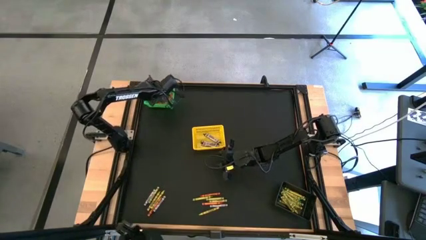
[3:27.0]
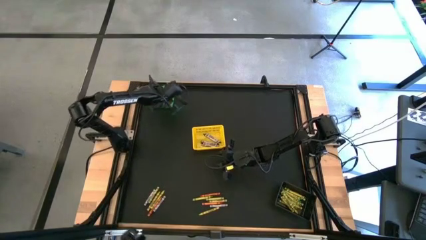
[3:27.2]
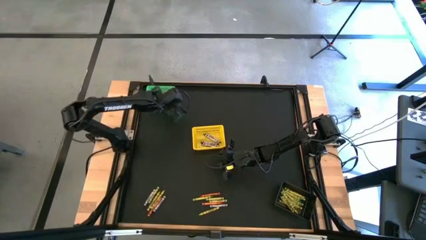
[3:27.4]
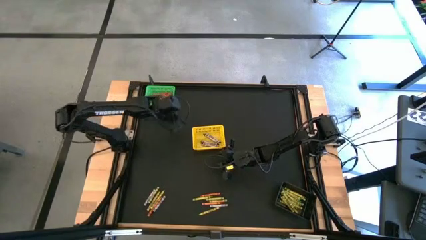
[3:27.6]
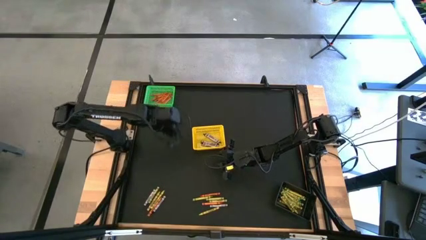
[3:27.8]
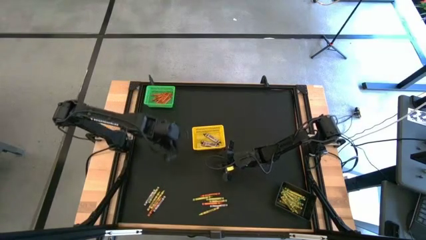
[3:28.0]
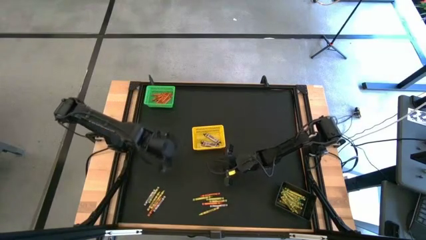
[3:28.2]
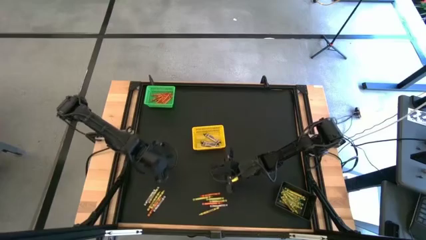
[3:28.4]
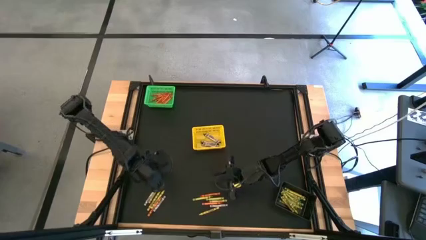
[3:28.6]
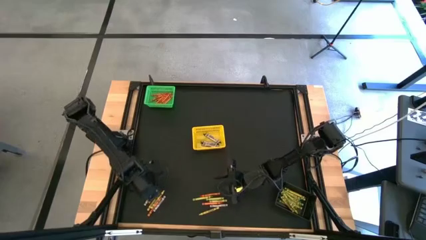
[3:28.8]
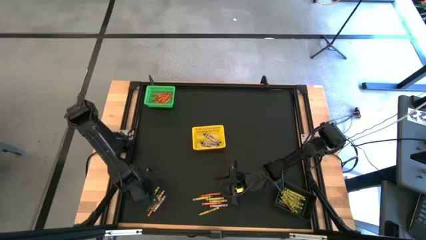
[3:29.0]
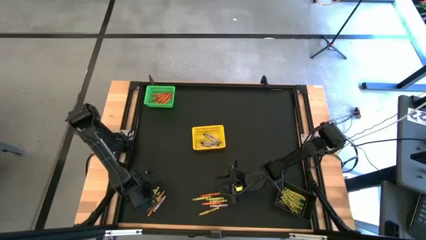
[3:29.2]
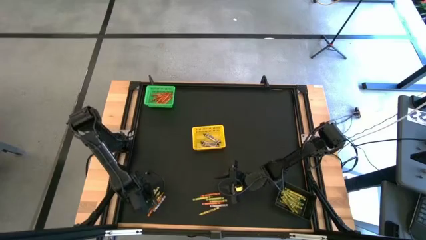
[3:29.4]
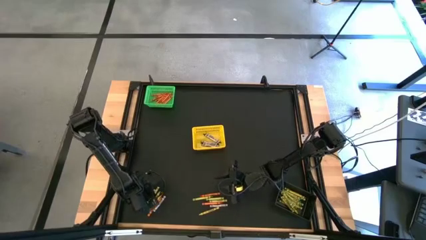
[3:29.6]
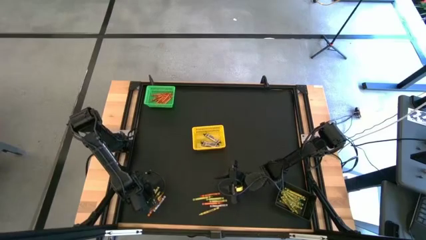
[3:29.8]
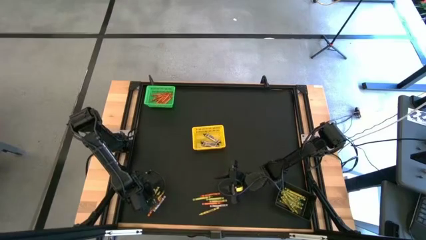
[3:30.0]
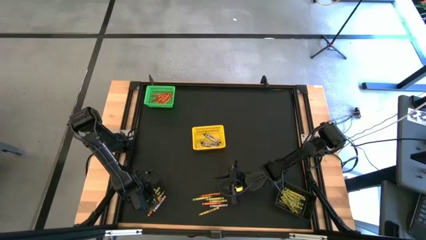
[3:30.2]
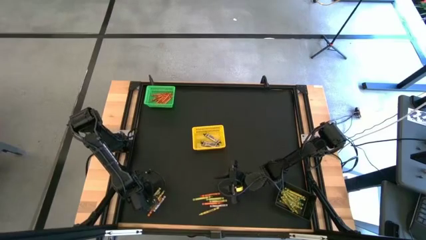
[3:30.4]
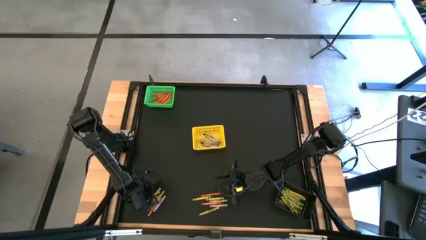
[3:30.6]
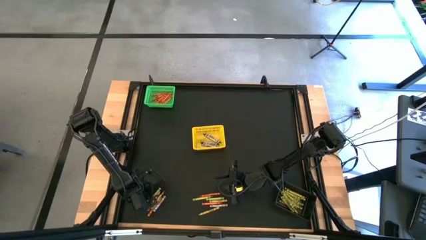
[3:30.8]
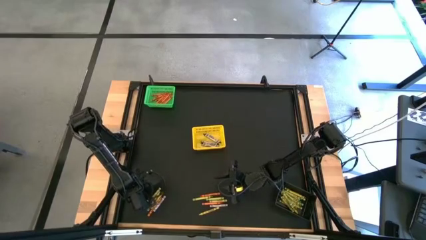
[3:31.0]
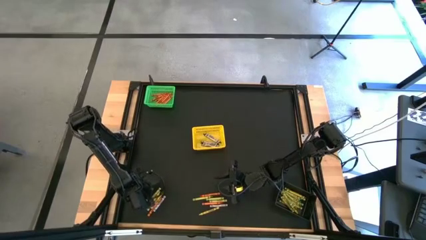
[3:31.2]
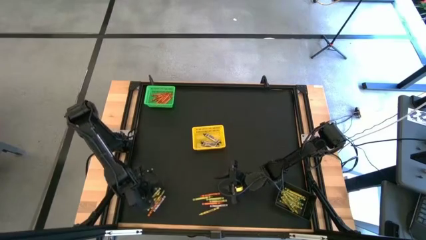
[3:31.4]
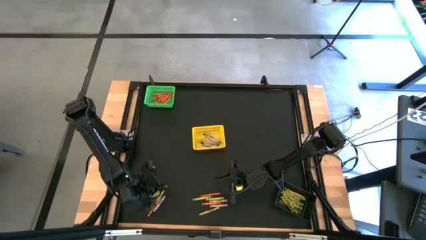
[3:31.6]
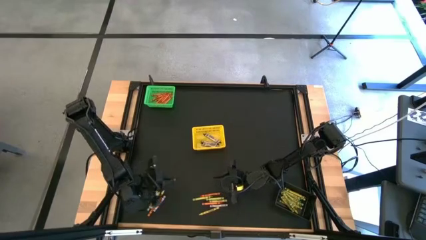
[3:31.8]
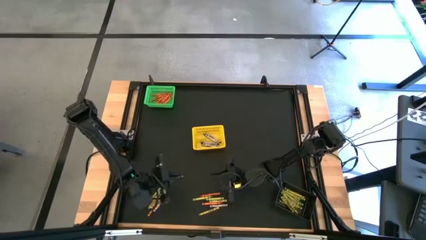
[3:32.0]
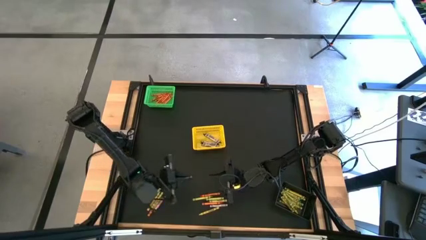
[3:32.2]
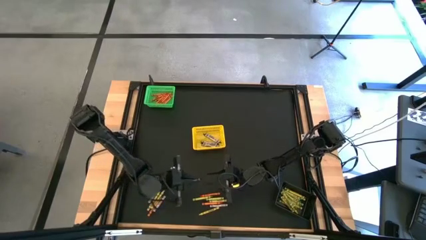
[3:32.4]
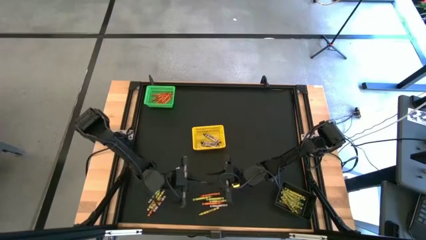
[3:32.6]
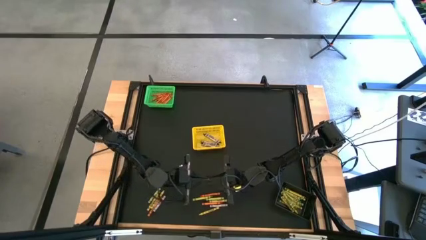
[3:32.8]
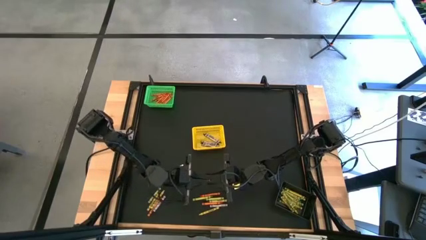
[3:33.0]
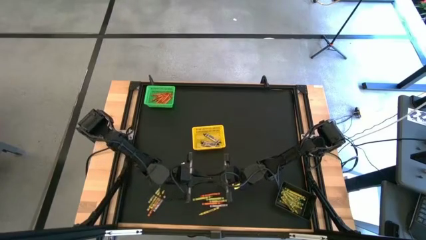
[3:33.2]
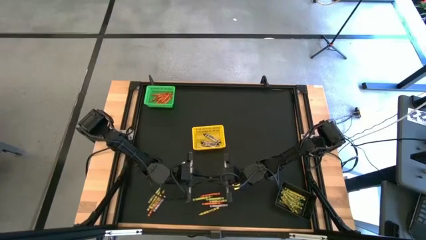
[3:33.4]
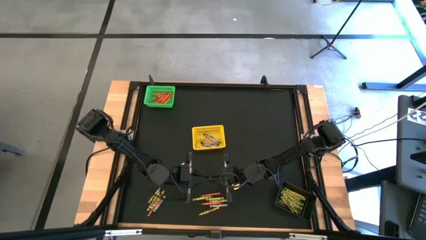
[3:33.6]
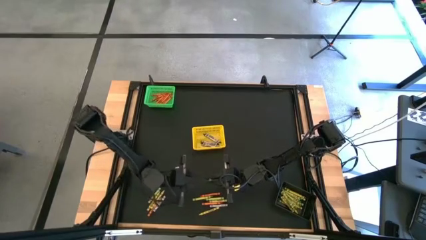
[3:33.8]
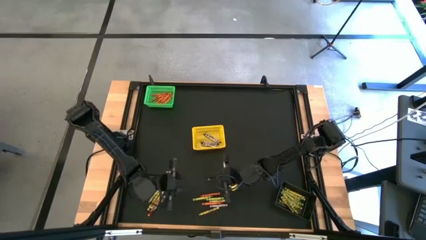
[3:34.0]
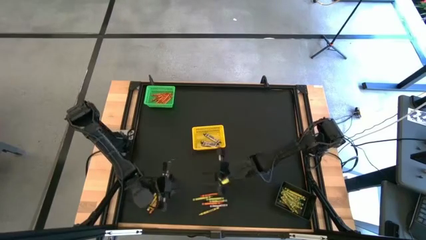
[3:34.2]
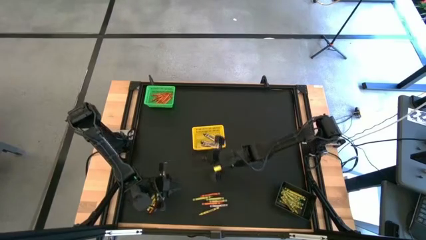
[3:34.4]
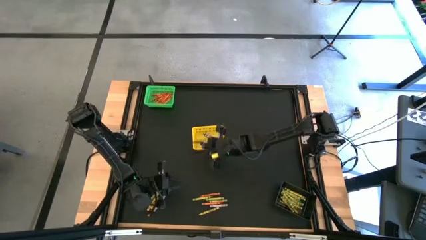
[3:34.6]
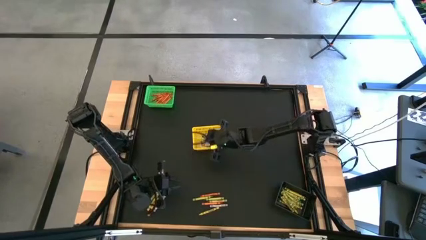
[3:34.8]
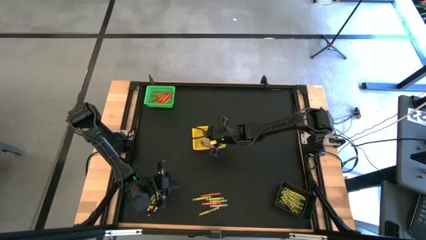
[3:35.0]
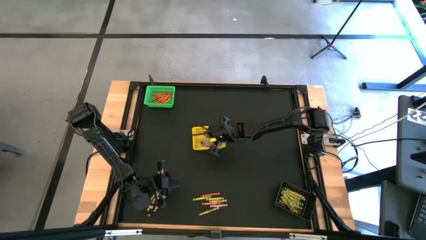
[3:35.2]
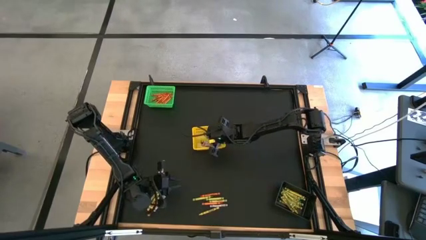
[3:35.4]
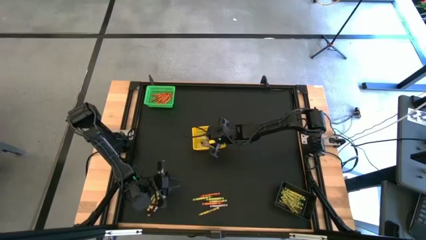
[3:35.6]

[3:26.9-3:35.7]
Task: Sort crayons
Put the black crayon into the yellow bin

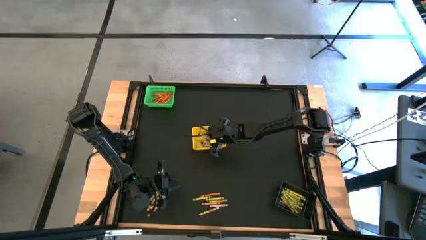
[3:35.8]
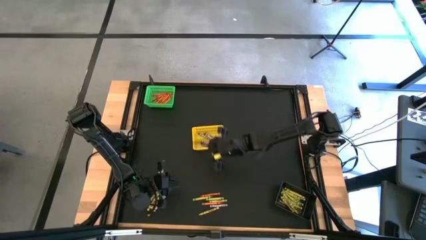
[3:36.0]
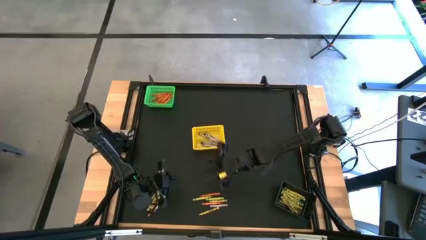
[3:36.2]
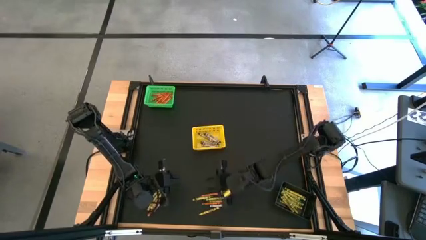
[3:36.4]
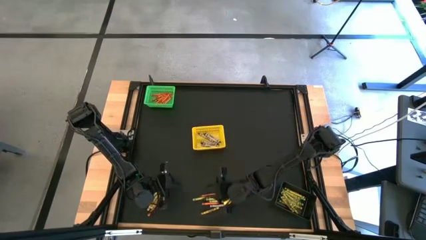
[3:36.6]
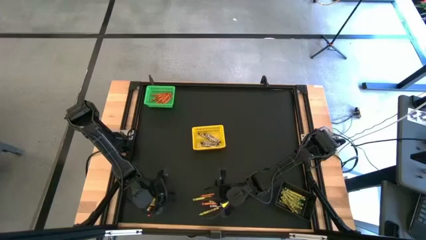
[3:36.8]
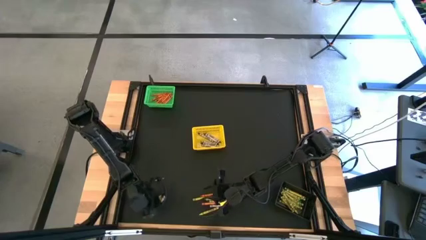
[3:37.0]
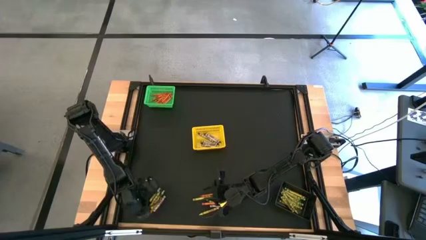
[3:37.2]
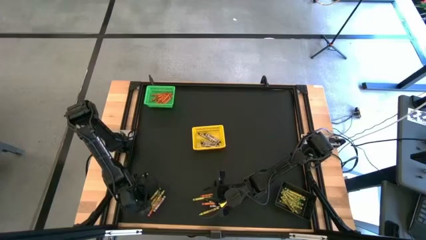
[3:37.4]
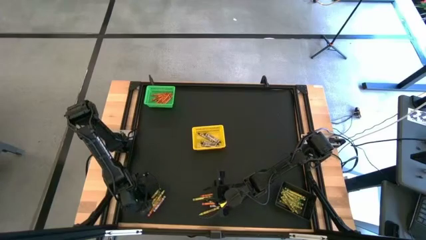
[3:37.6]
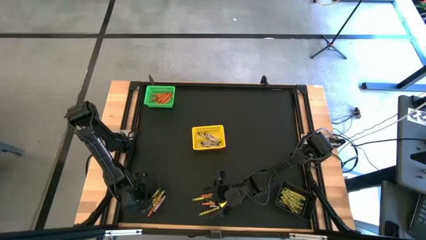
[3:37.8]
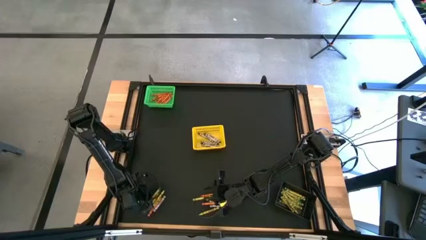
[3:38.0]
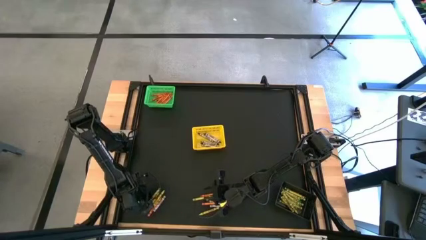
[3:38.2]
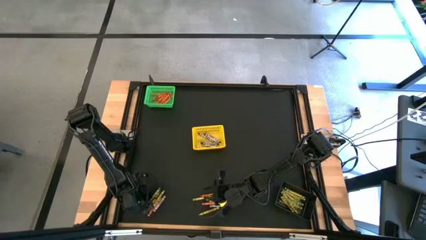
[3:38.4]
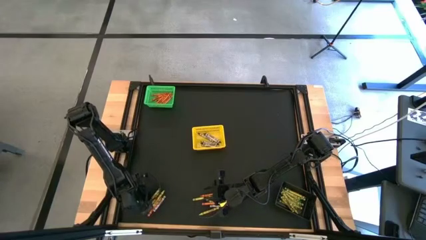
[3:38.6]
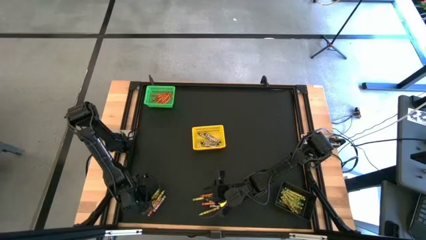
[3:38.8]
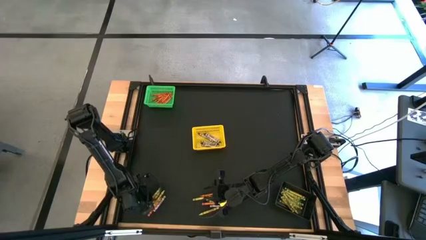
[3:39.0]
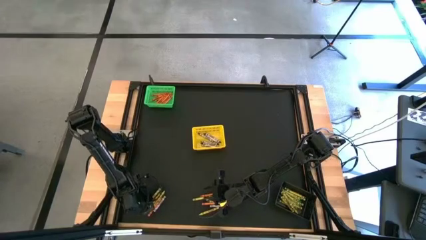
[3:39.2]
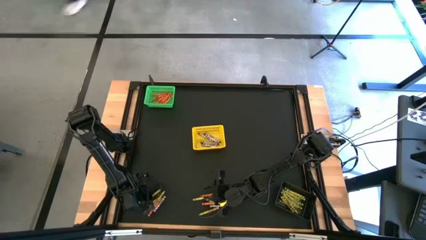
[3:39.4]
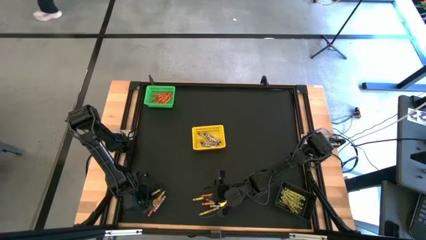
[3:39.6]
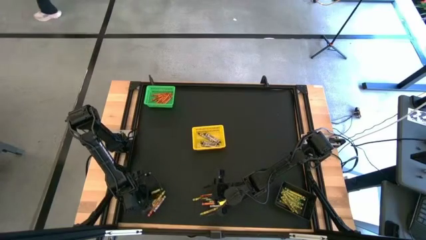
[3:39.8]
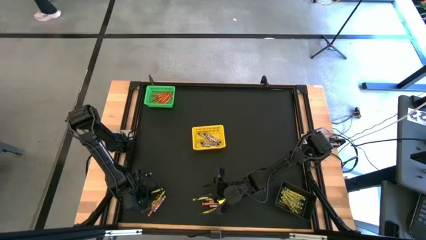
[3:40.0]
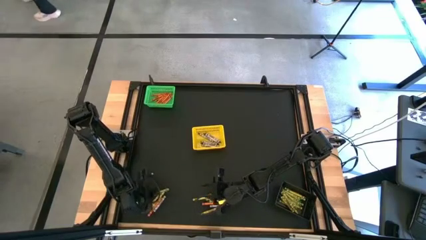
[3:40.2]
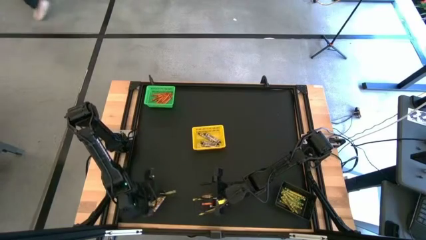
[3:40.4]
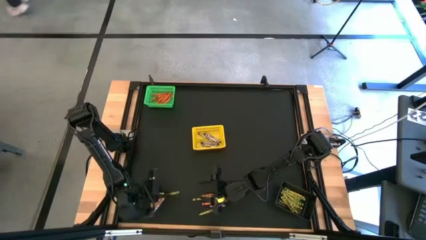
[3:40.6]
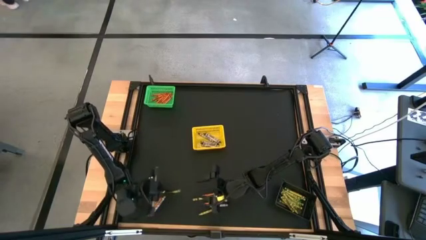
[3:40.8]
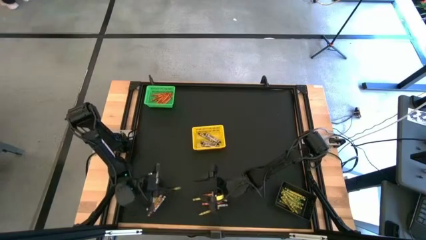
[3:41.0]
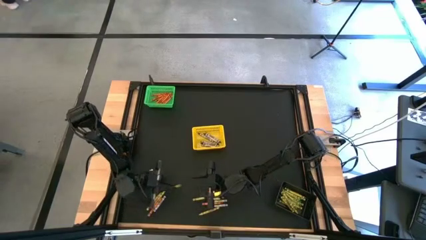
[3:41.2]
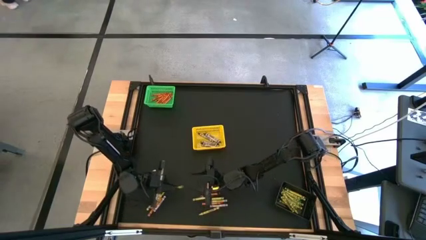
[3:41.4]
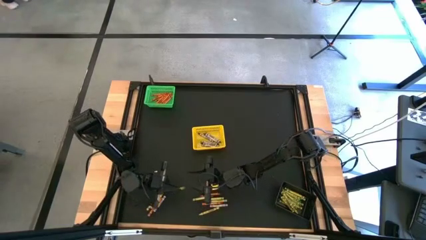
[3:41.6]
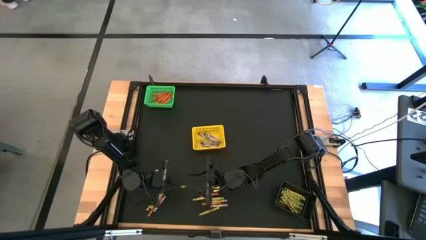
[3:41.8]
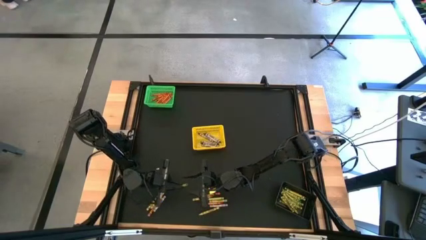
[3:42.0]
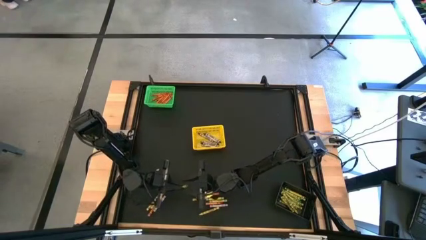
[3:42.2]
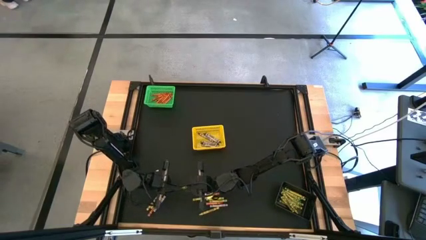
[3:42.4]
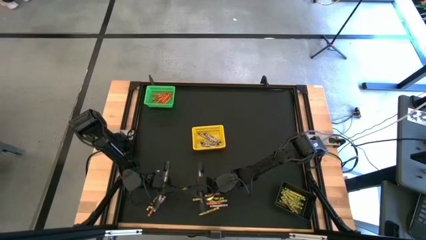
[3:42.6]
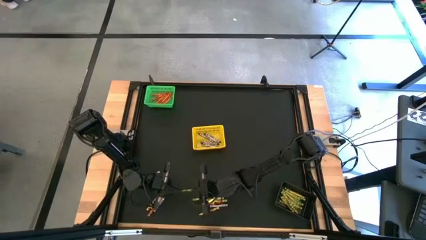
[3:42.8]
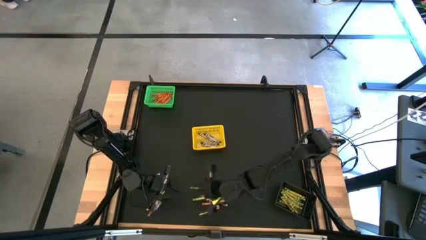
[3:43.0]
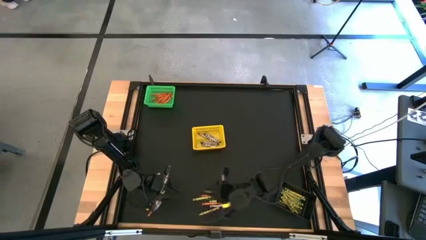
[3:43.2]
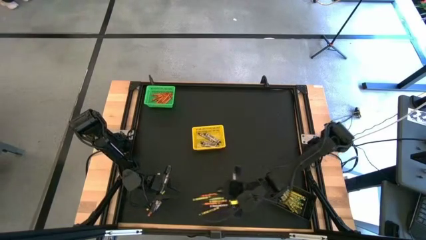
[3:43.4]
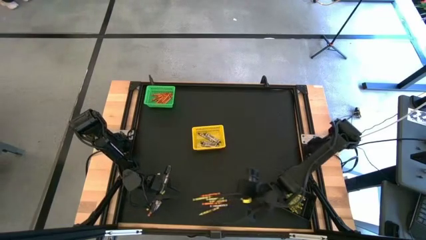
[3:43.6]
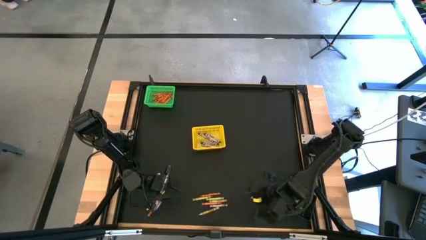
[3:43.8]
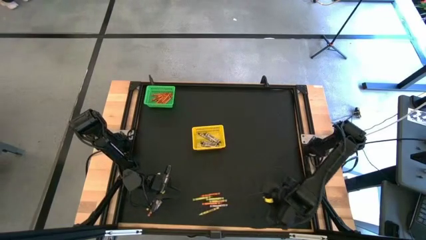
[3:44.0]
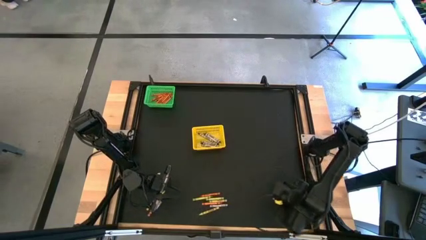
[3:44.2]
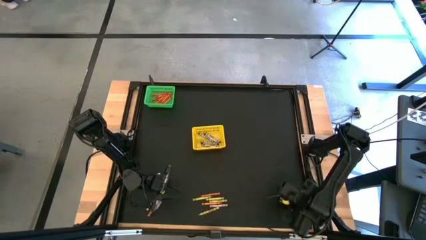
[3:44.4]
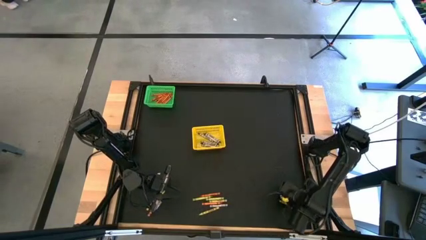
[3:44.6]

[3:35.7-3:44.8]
Put the green crayon into the black bin
